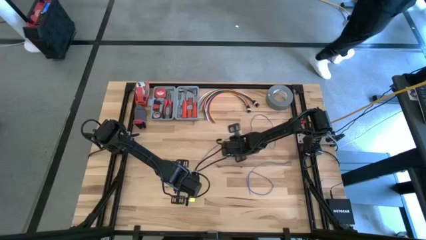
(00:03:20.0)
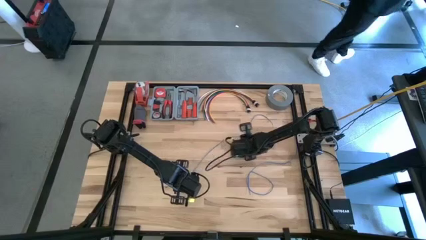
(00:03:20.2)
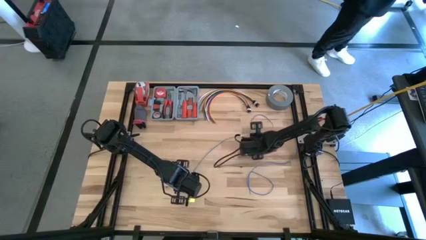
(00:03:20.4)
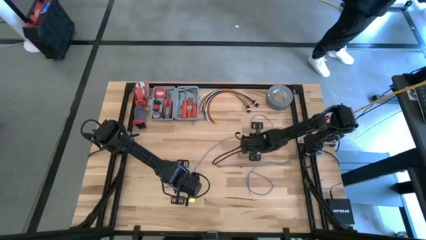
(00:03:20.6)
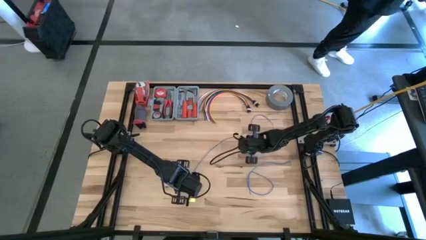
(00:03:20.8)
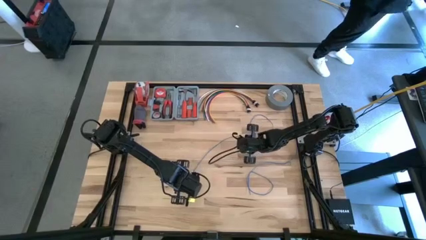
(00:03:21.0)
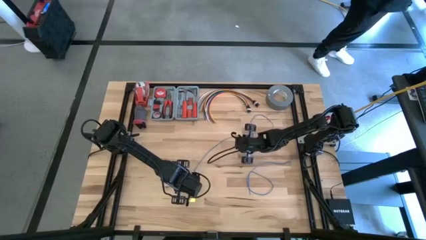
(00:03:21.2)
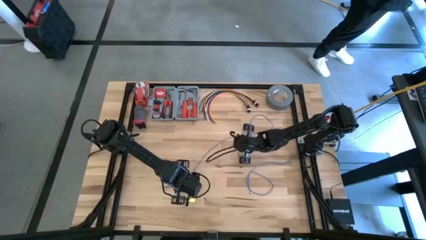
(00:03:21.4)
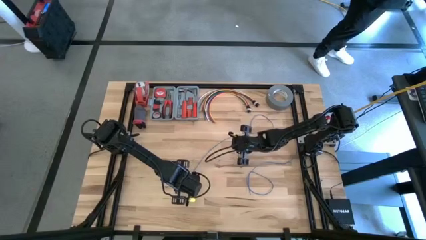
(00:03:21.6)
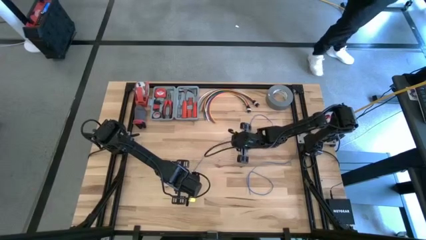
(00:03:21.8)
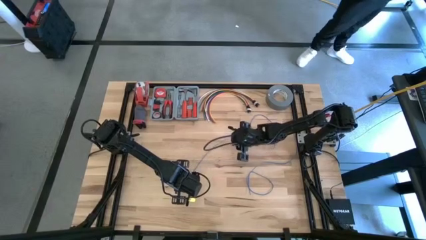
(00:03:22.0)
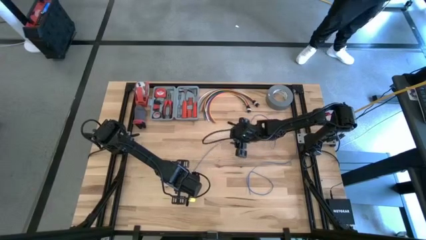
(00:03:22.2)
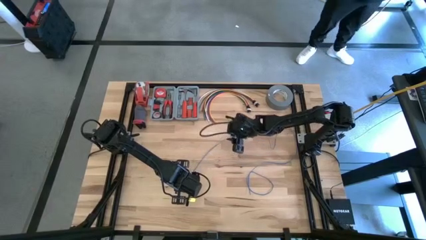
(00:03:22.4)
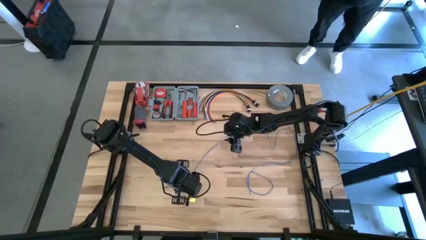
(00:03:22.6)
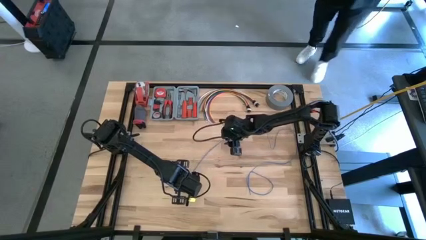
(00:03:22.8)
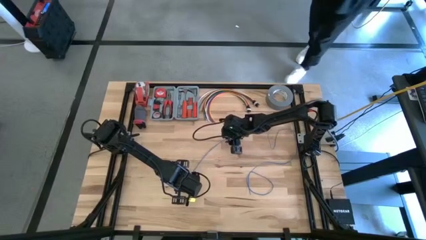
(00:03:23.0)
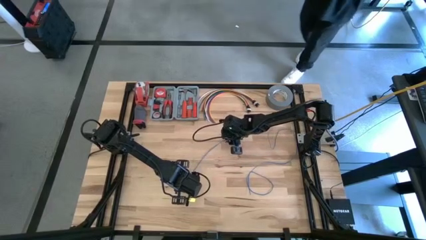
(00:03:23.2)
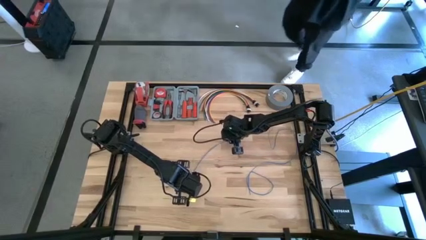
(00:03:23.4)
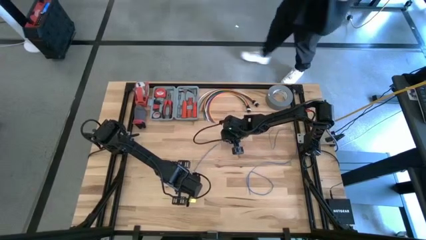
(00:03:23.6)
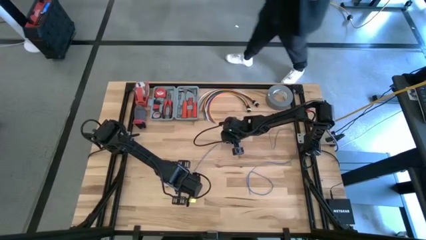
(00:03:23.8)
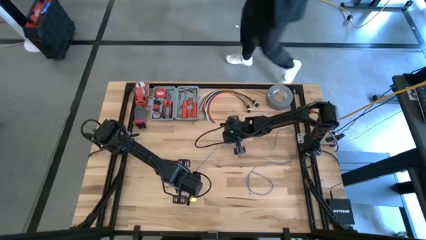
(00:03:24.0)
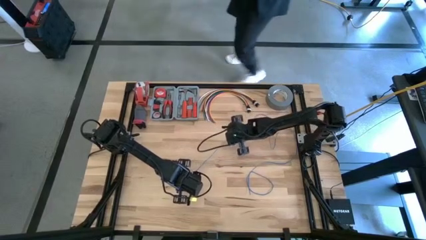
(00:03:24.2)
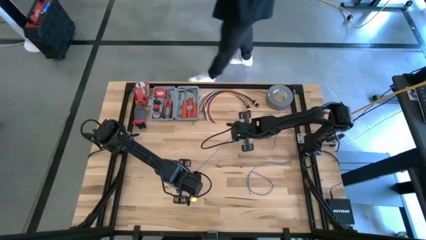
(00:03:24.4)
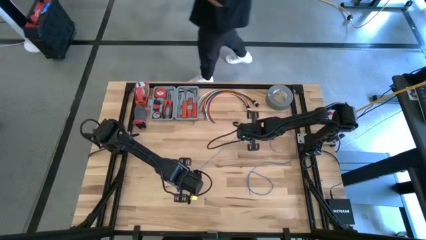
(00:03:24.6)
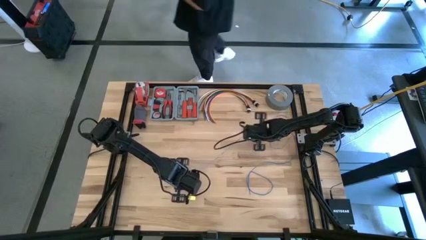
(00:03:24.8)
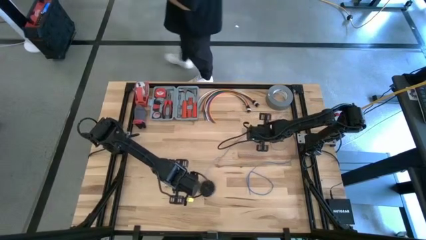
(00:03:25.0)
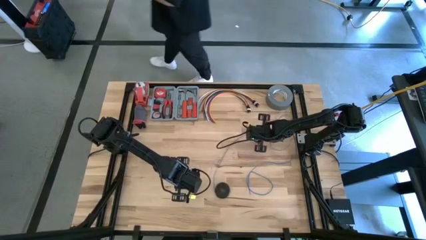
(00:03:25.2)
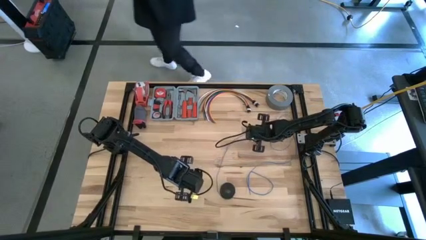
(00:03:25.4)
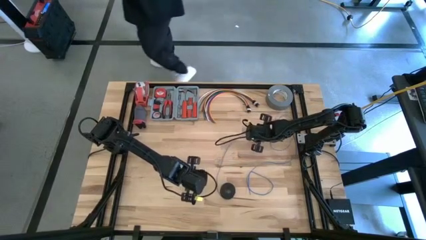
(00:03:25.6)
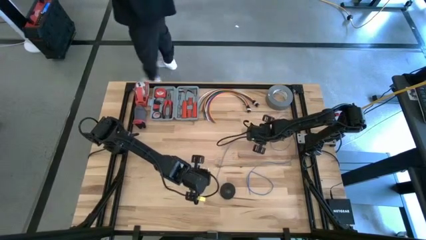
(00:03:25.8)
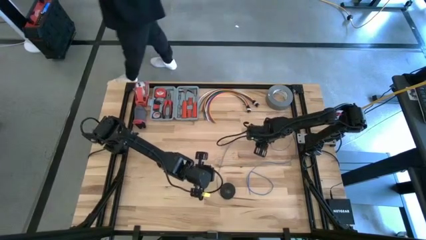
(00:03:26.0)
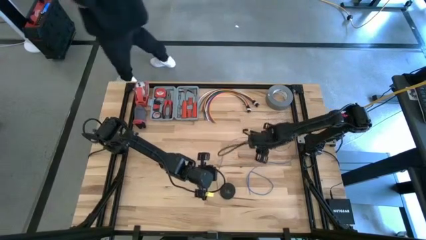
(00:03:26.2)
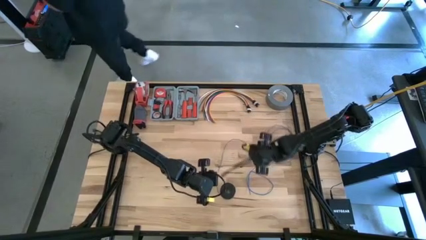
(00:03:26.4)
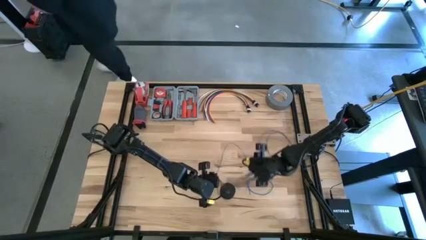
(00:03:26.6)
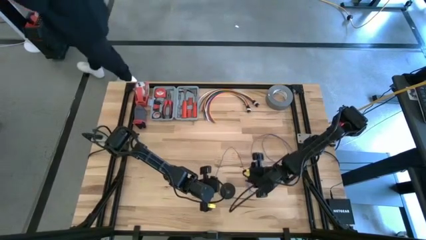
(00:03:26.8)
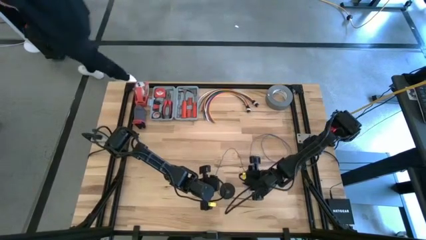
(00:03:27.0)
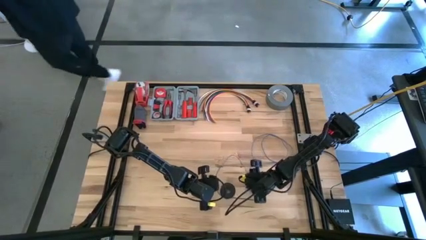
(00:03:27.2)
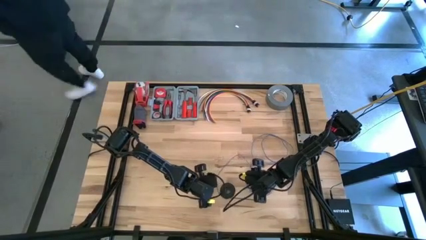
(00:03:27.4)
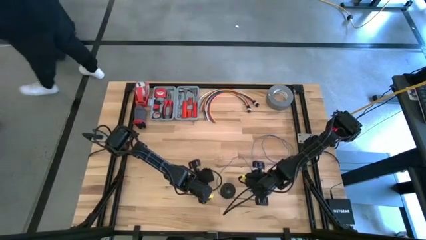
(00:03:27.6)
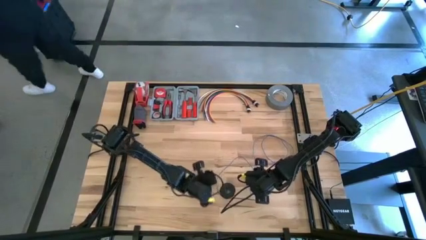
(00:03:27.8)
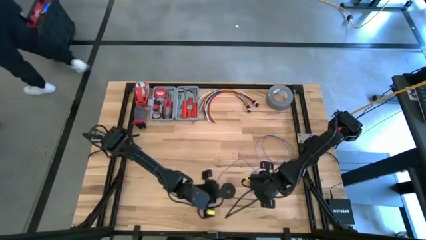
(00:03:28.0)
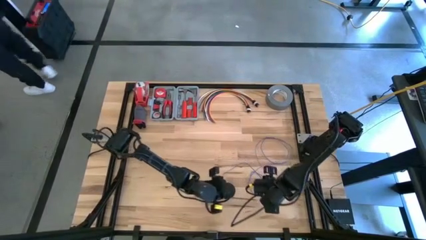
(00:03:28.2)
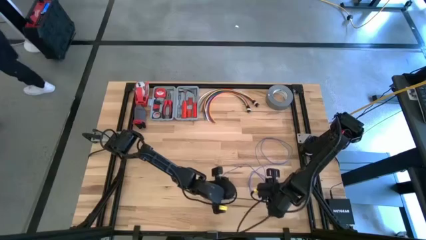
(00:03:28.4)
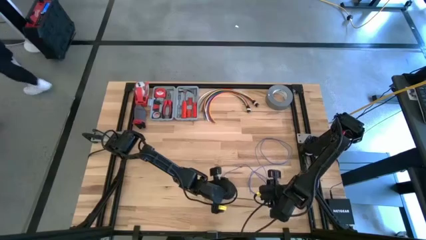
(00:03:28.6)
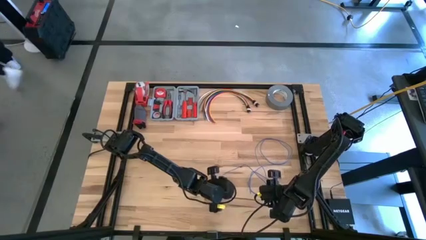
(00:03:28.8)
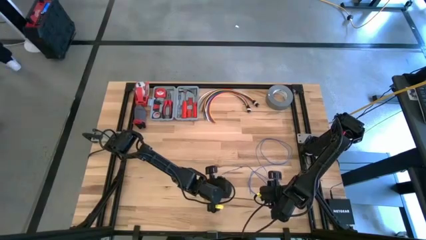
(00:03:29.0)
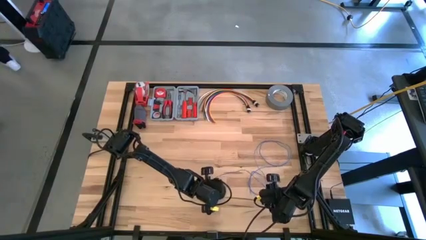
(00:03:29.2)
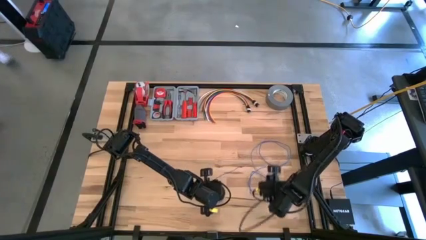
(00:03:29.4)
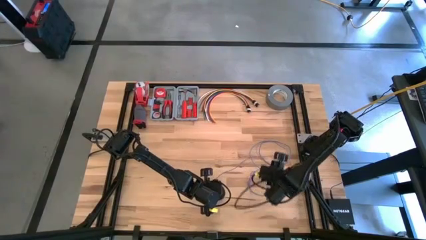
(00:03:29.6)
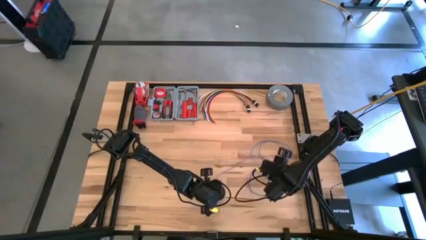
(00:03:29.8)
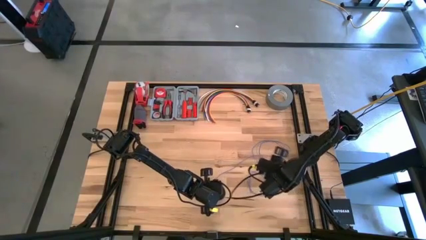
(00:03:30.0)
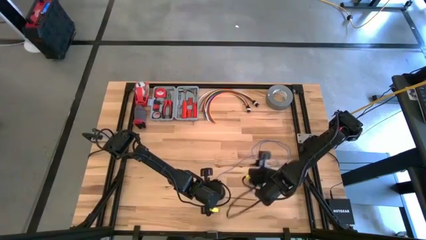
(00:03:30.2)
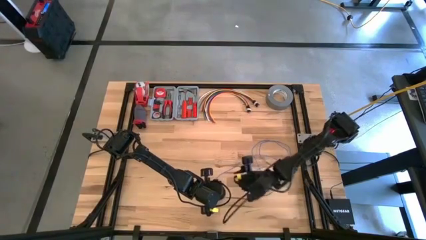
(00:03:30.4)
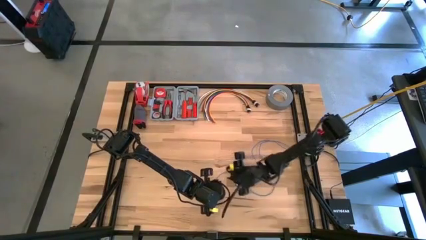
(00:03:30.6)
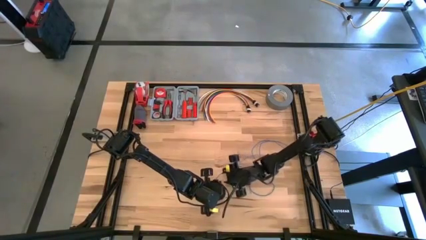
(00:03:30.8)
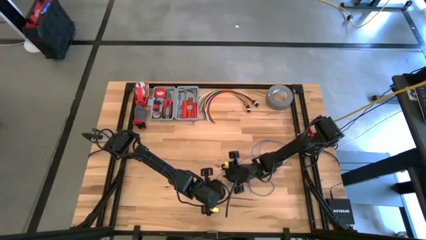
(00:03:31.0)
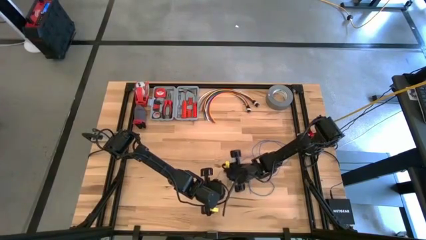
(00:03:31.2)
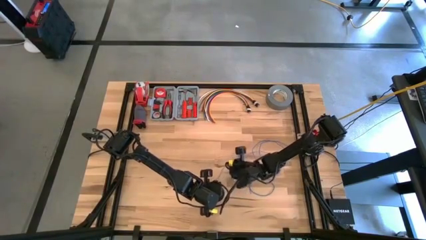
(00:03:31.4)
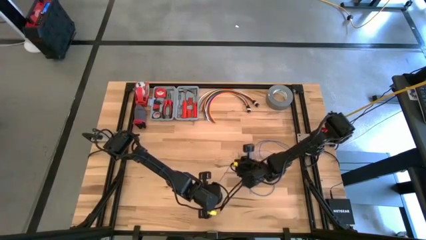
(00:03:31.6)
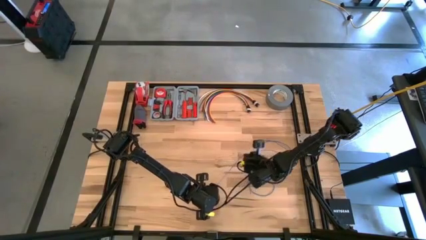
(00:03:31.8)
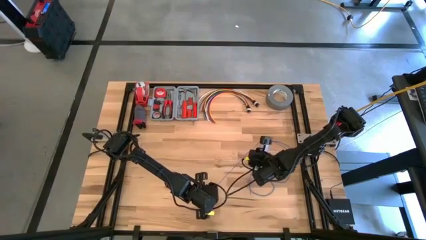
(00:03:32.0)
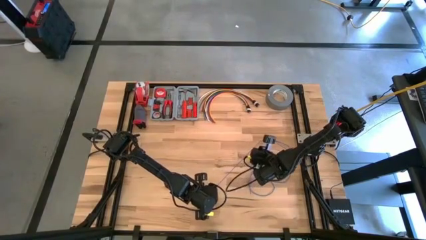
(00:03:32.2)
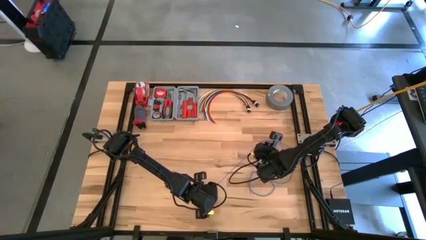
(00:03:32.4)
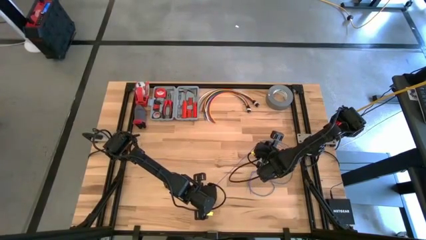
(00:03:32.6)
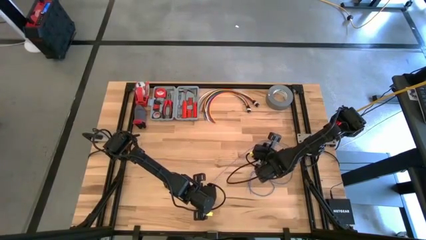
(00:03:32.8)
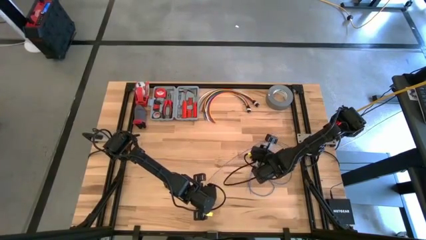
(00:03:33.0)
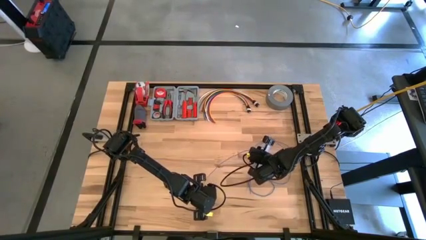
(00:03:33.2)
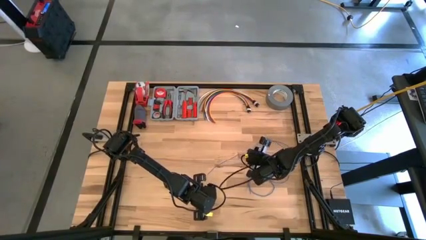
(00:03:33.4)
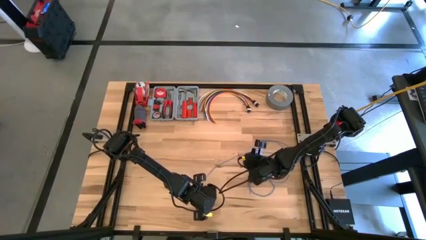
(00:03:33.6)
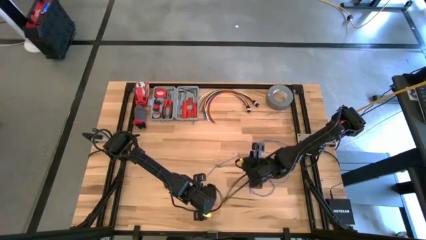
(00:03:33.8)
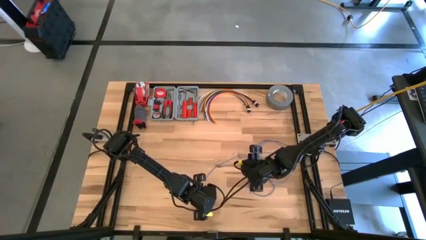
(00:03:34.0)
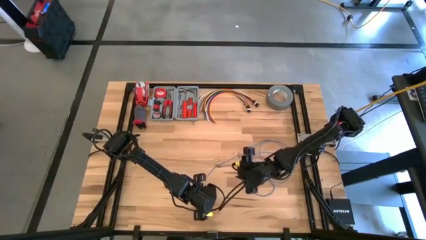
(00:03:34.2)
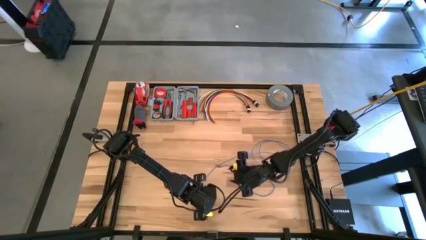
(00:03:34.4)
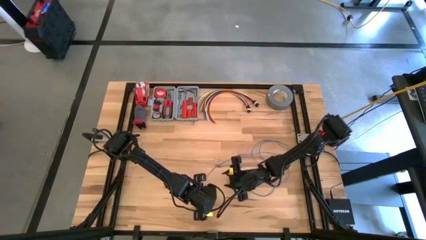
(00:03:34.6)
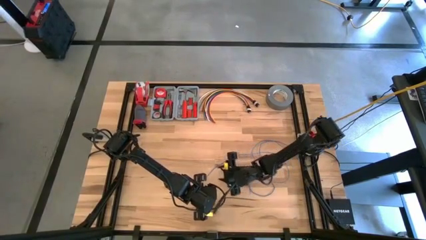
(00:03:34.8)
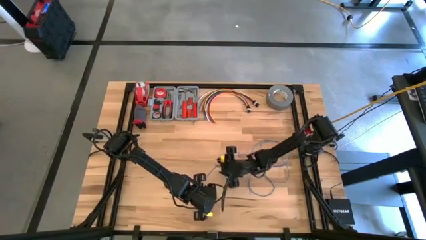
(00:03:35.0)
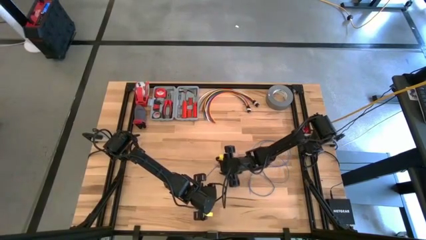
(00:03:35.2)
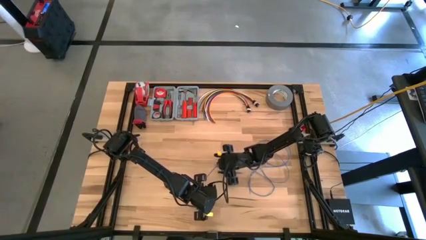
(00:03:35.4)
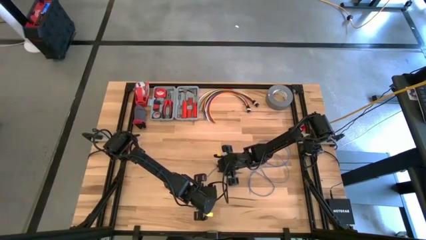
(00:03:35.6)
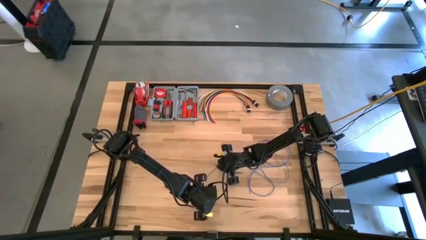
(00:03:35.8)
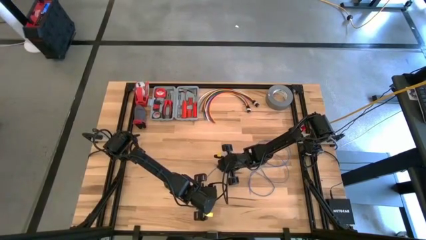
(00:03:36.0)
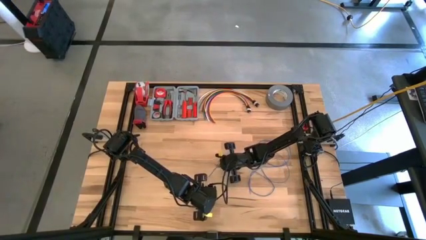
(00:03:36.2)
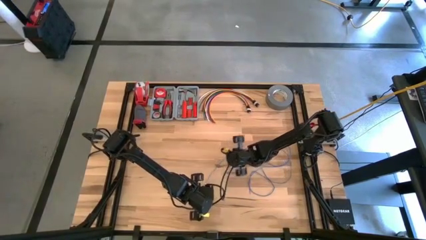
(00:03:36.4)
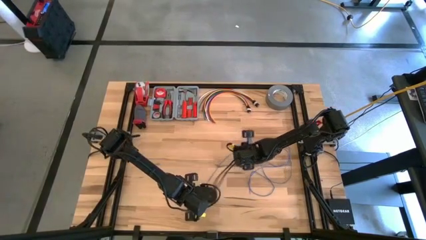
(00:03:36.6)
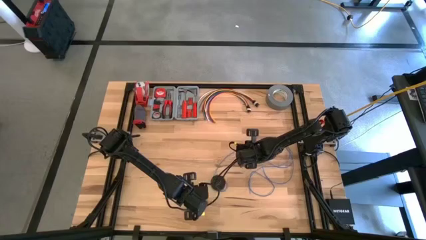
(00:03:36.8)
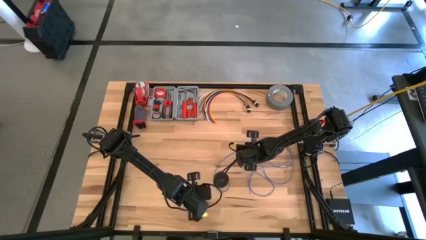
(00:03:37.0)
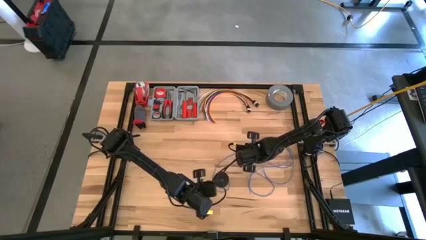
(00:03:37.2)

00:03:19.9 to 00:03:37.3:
Task: Coil cords
Uncoil the blue wire on the black spool
